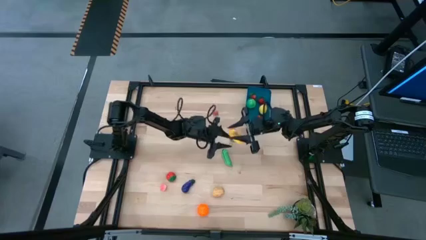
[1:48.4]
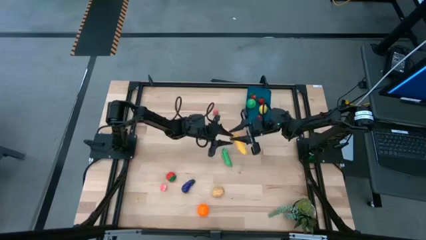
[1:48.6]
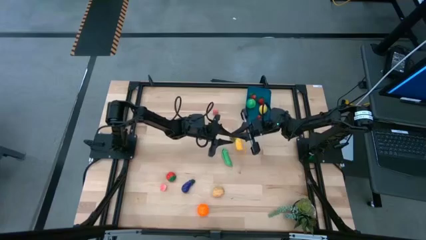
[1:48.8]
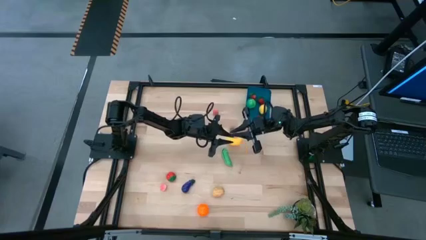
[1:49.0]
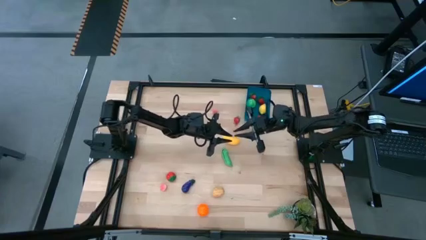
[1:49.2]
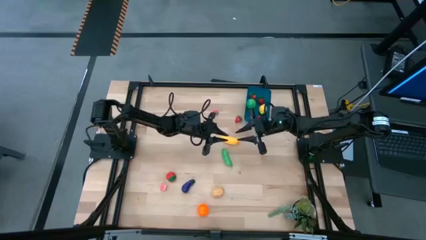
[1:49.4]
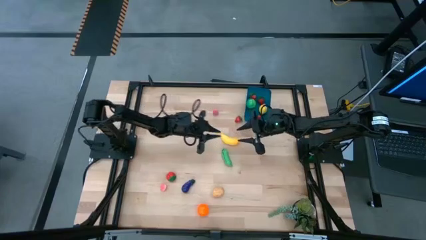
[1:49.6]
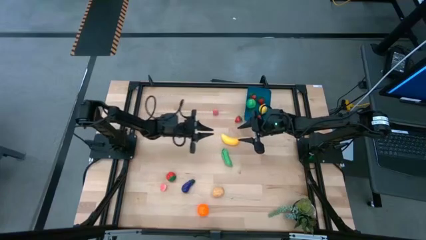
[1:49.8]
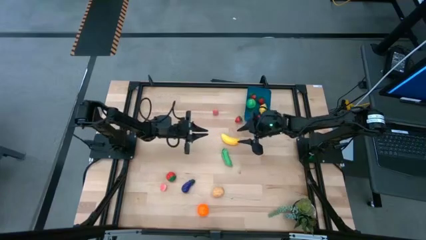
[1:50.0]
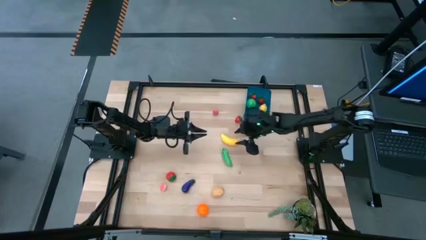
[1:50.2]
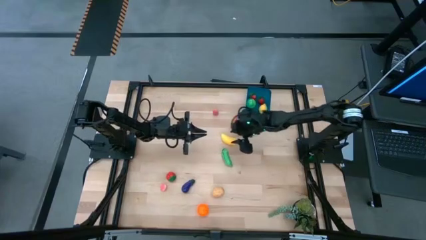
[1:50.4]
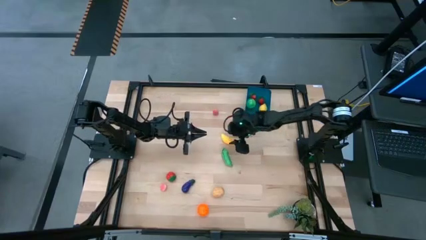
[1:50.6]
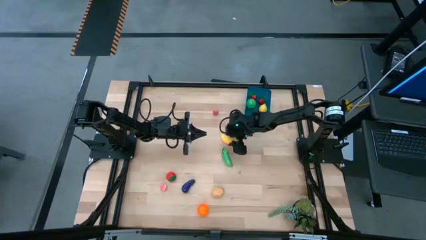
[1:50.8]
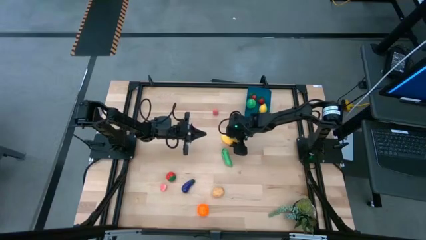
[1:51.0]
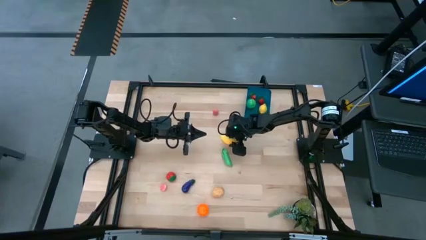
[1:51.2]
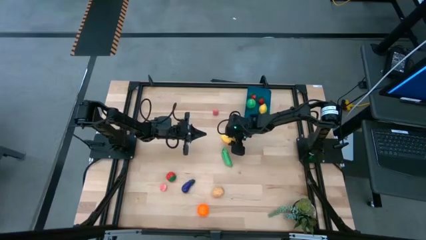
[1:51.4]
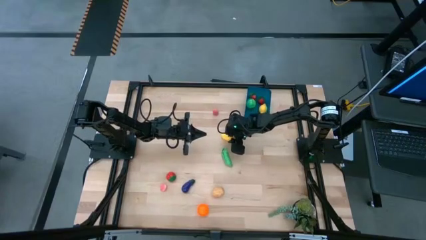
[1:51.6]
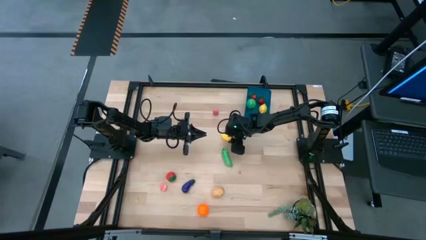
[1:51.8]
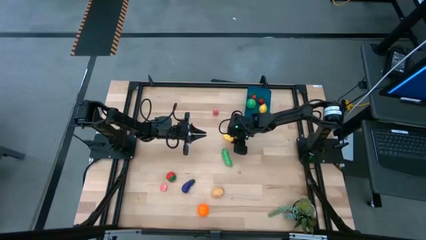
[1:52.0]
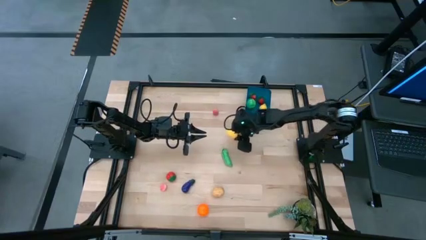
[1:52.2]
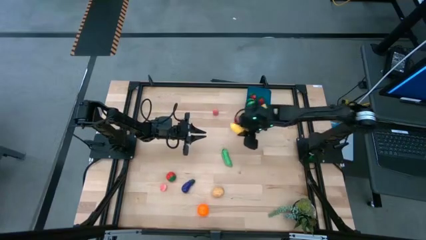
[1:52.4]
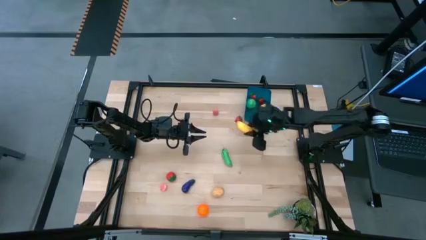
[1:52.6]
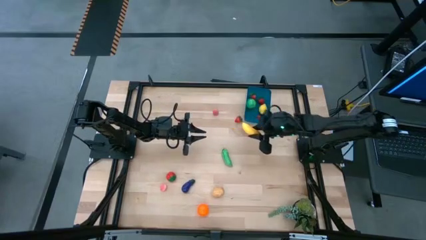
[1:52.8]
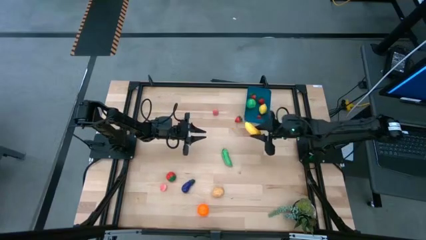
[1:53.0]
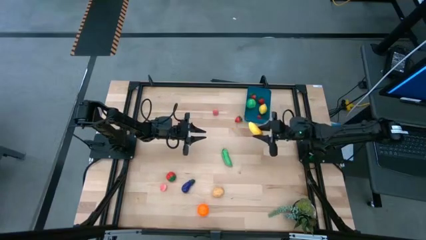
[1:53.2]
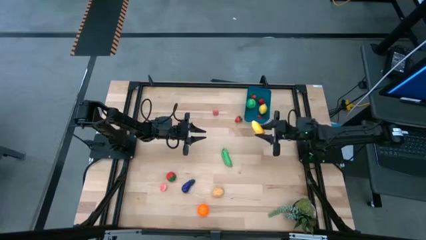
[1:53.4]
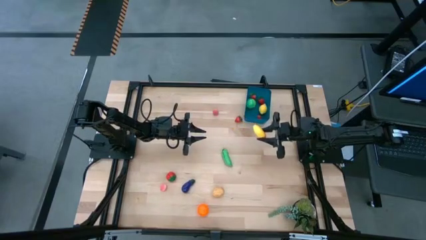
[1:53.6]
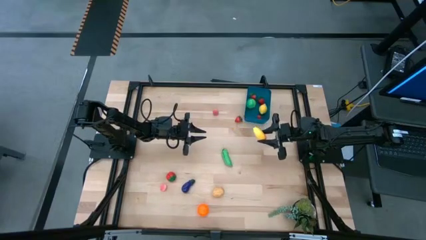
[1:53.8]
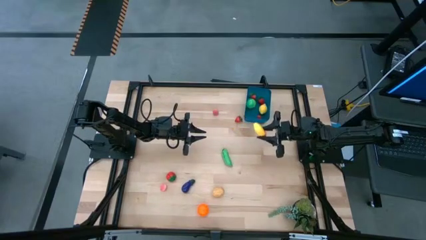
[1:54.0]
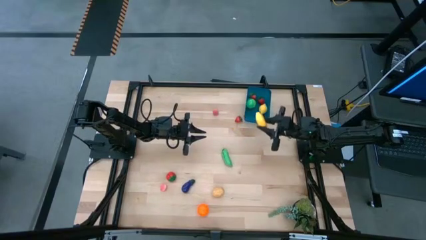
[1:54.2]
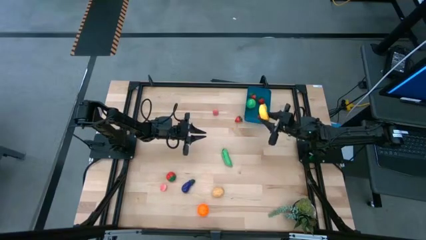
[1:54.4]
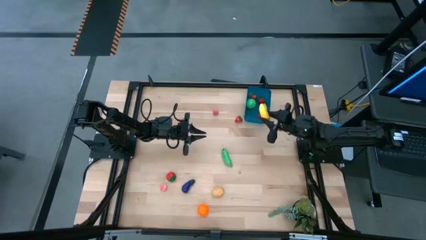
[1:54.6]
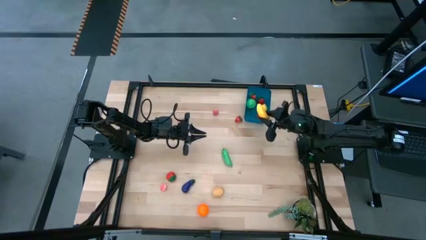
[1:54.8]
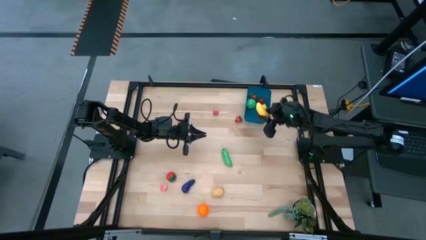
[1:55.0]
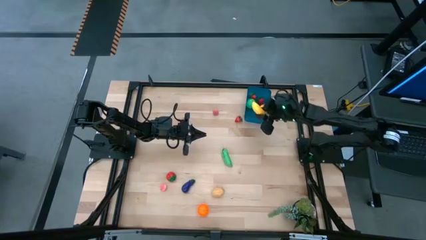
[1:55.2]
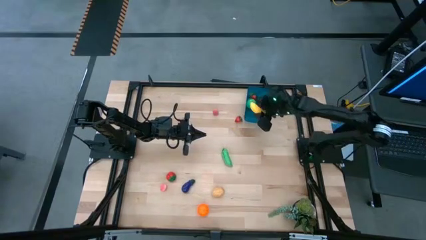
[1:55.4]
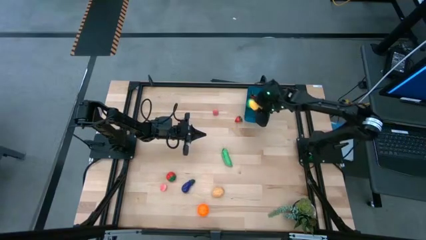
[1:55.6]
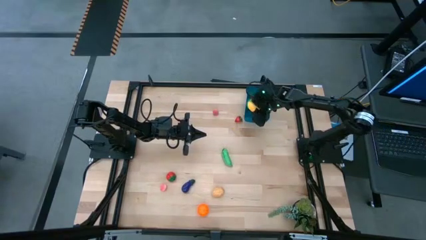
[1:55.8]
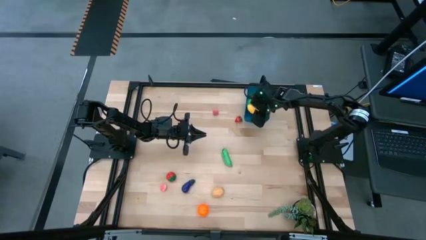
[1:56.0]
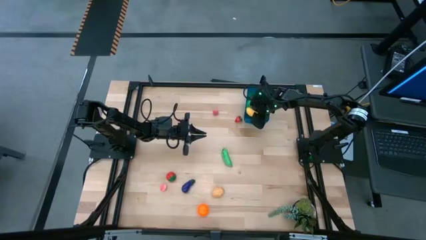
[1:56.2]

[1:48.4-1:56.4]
Task: Pick and placing Produce into tupperware
Put the yellow banana into the blue bin

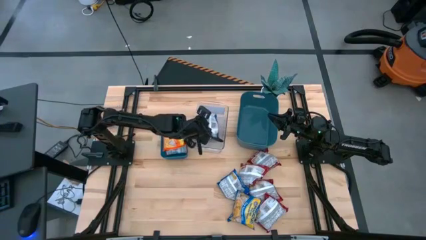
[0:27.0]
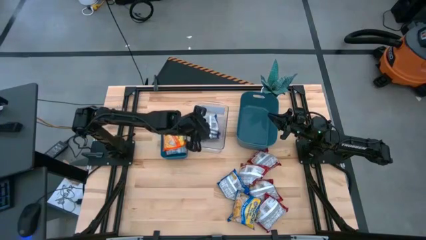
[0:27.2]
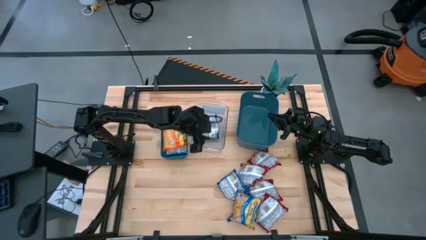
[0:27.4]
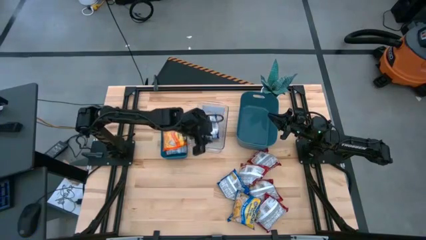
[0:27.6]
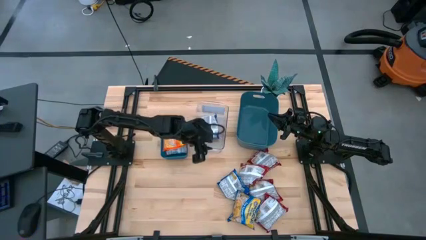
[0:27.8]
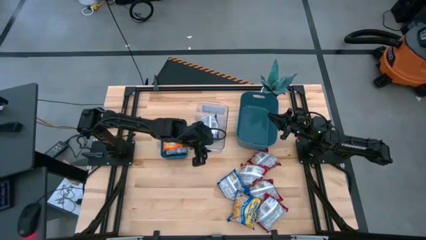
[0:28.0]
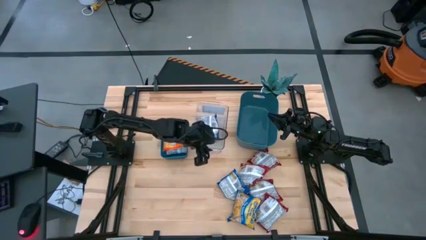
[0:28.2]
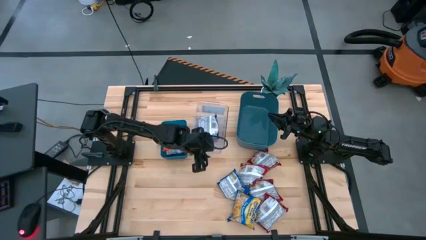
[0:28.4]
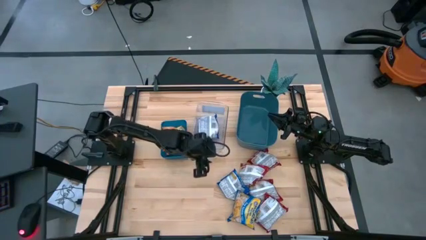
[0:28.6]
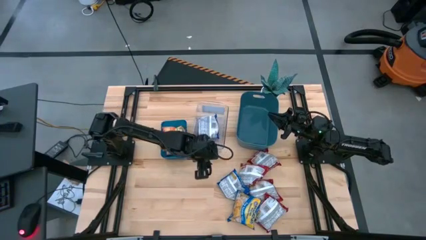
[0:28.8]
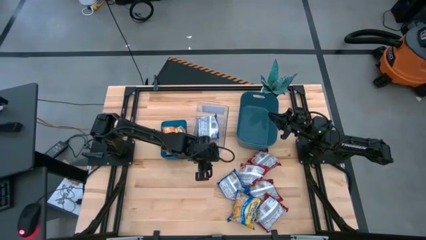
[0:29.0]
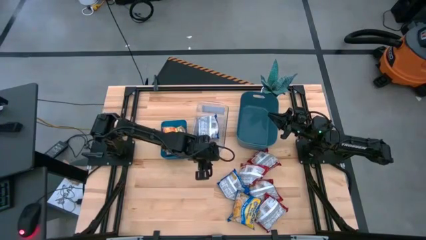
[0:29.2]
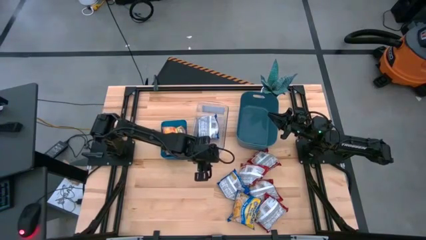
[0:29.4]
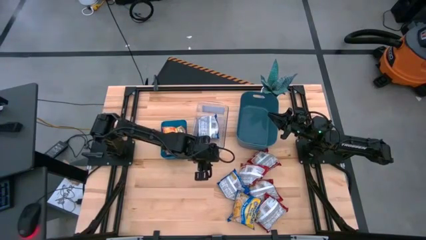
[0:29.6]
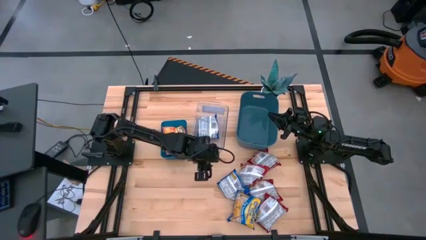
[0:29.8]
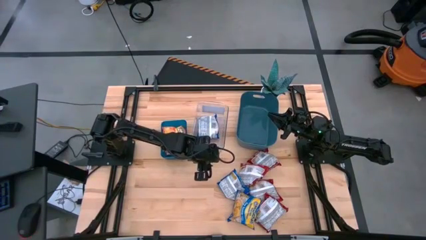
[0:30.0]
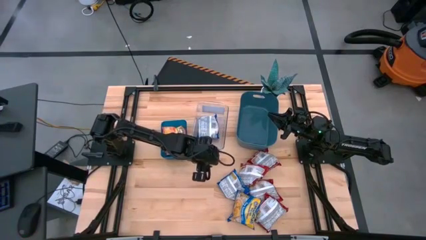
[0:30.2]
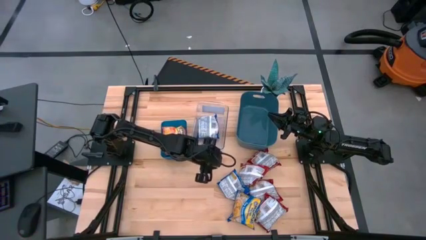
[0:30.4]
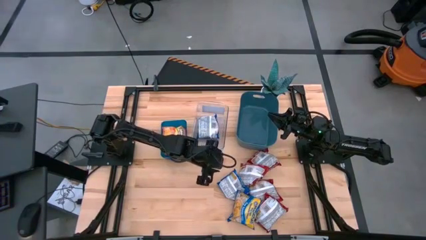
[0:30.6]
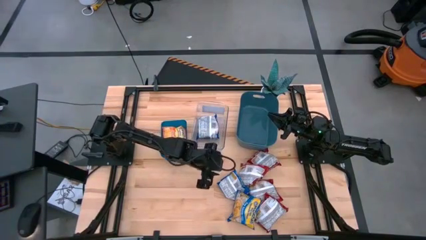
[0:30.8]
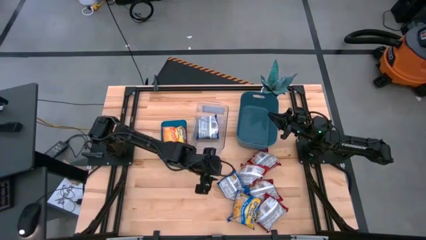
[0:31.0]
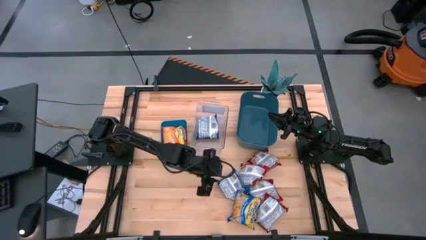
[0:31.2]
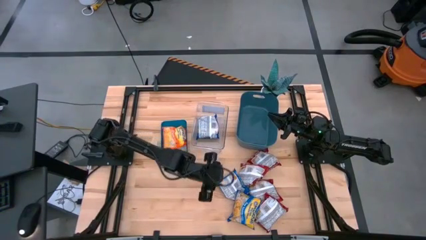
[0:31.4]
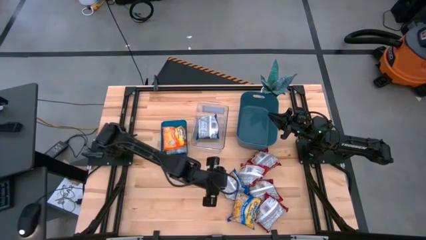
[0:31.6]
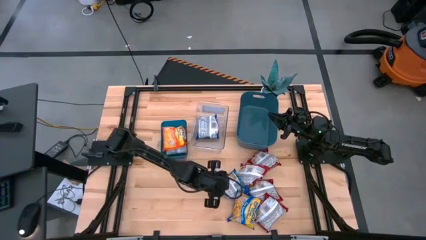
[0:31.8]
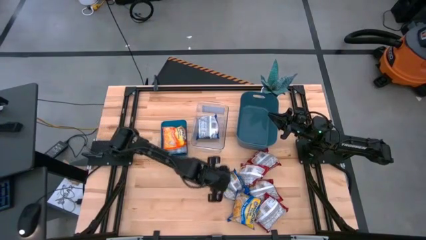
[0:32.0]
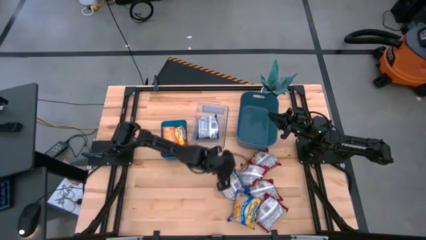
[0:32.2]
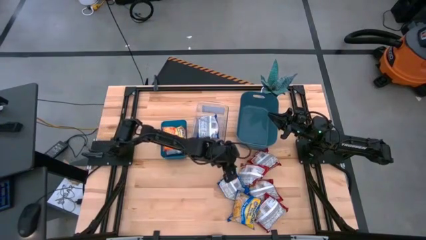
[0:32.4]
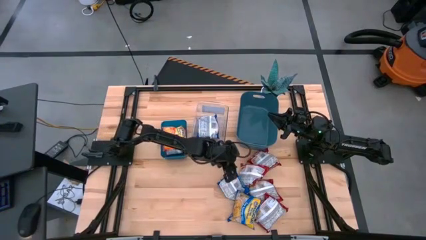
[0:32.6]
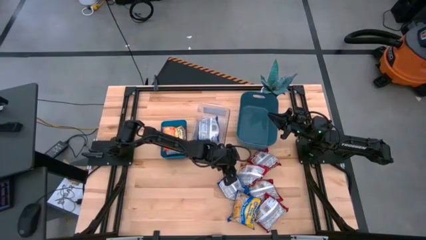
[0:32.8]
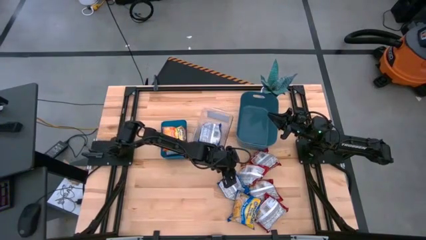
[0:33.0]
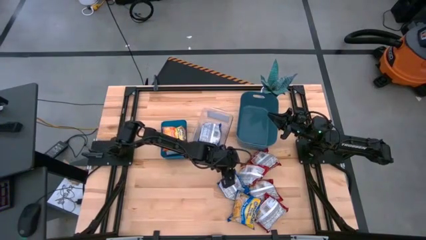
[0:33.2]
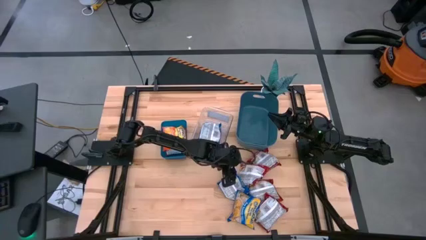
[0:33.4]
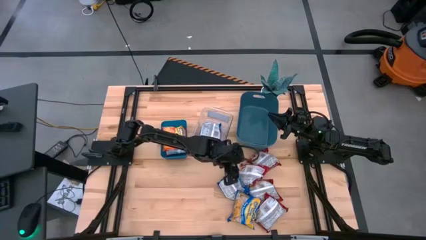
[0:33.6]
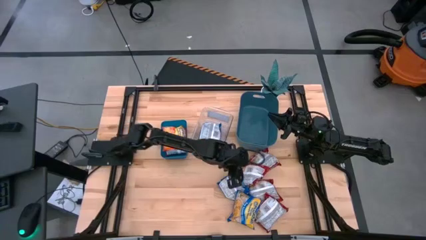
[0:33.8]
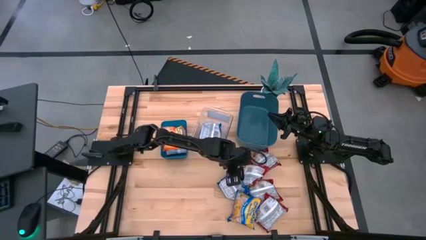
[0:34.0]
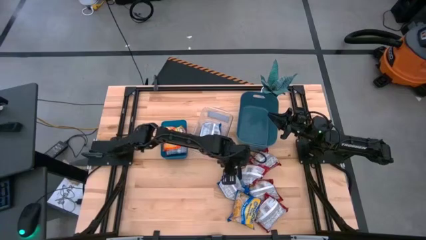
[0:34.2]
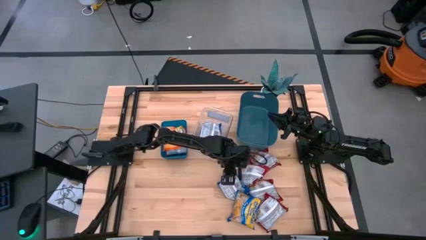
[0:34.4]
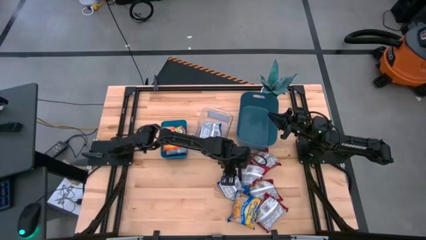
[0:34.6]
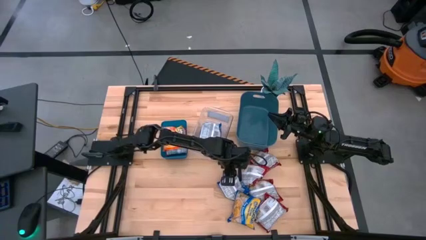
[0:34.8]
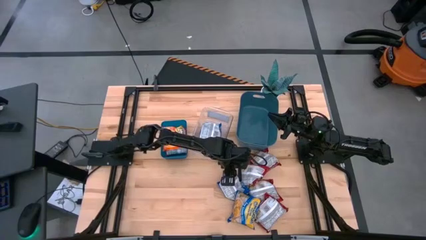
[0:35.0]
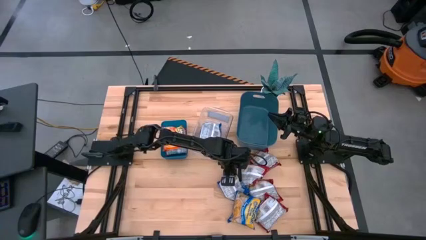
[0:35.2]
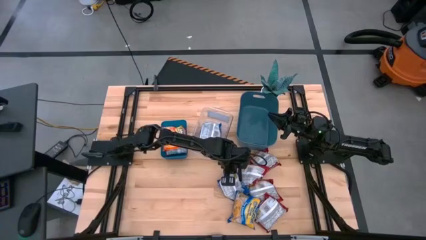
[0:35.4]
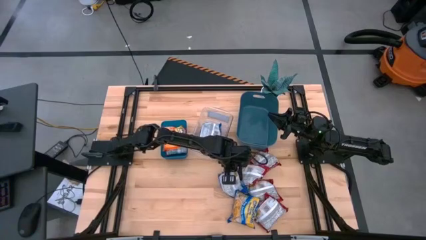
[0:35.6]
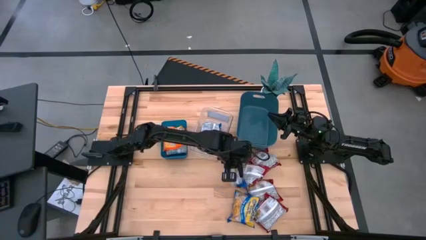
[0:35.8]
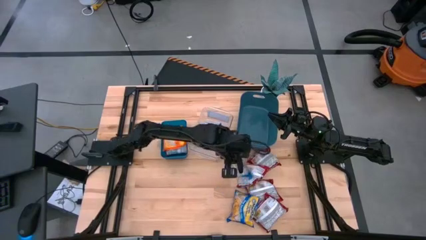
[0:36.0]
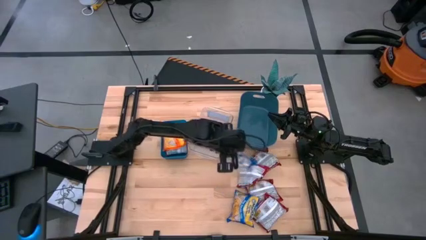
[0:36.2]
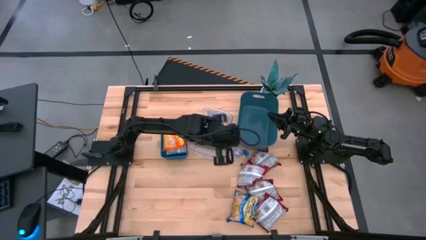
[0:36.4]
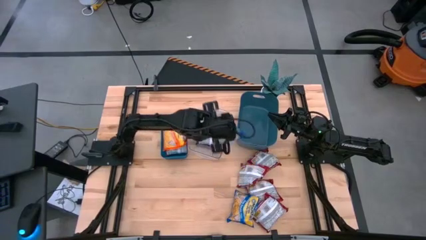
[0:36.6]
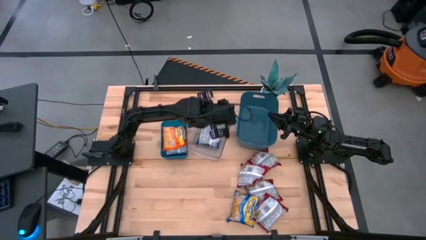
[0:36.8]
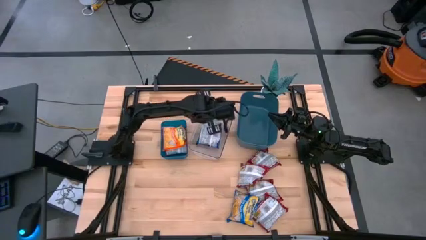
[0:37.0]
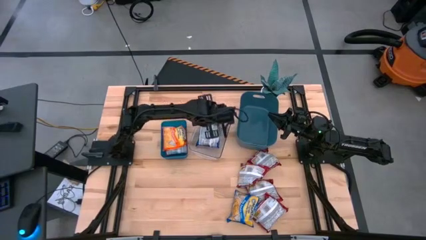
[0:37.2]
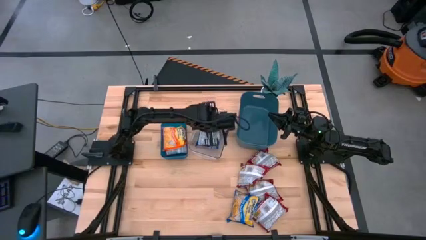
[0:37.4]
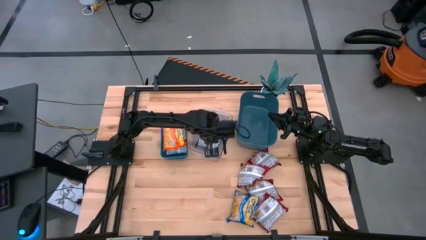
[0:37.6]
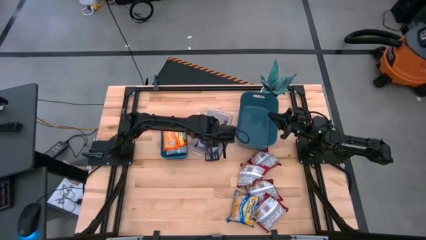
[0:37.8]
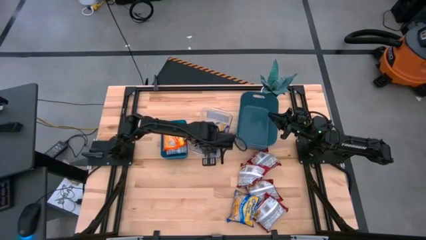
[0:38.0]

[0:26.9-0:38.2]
Task: Sort Maruchan noodles
Put the blue noodle pack into the transparent bin
